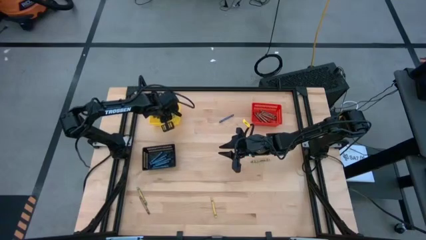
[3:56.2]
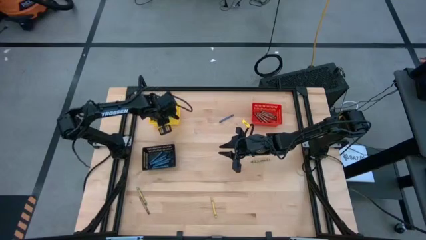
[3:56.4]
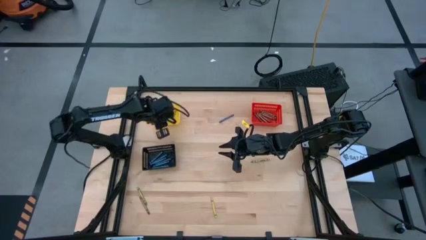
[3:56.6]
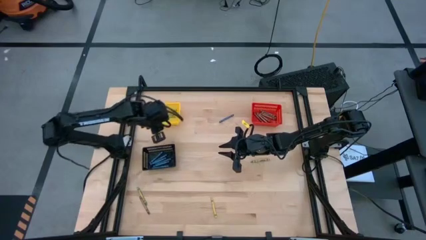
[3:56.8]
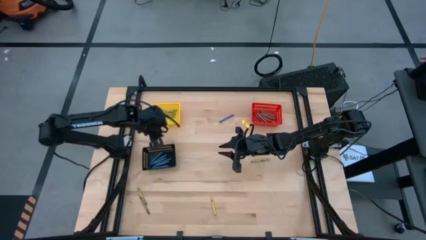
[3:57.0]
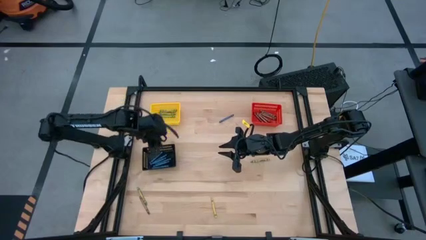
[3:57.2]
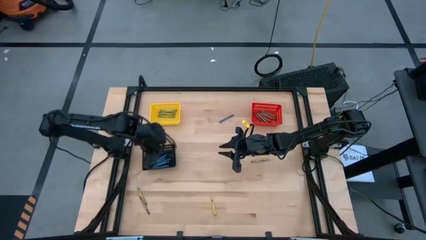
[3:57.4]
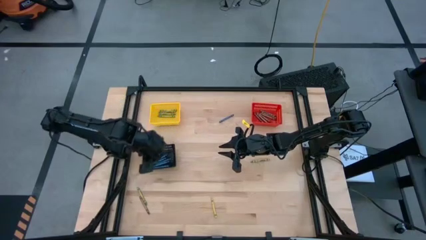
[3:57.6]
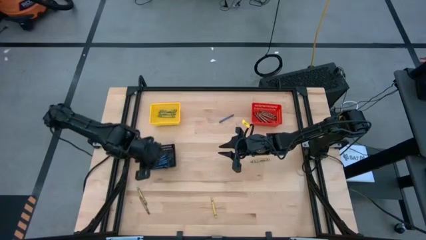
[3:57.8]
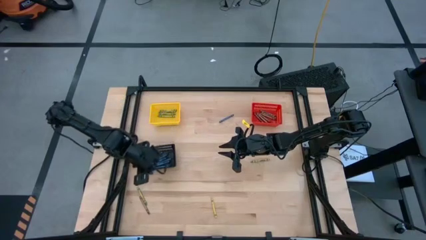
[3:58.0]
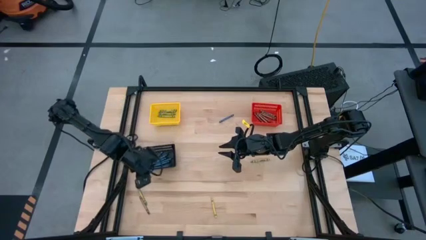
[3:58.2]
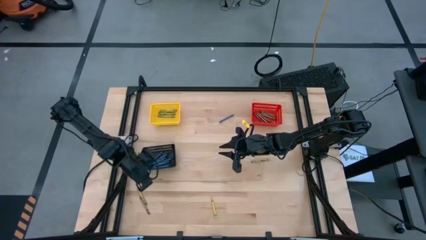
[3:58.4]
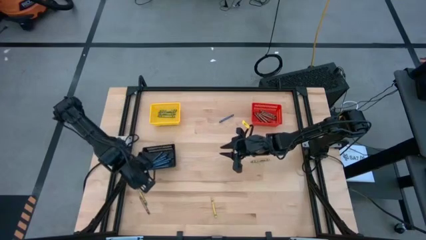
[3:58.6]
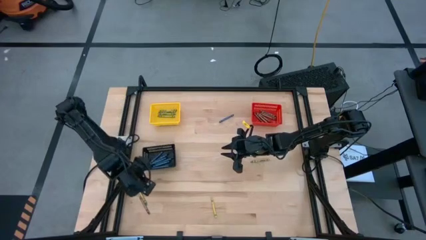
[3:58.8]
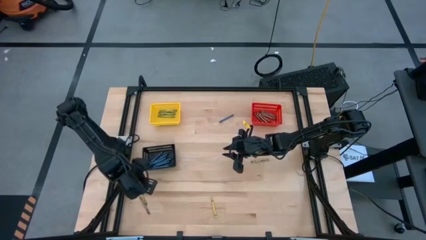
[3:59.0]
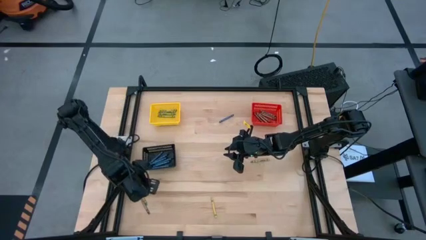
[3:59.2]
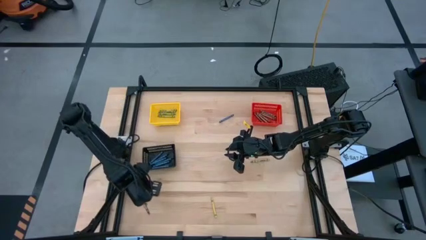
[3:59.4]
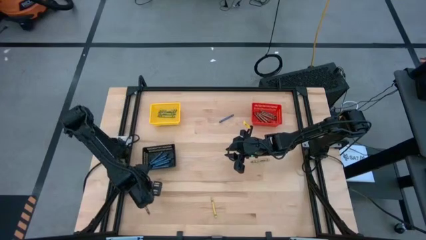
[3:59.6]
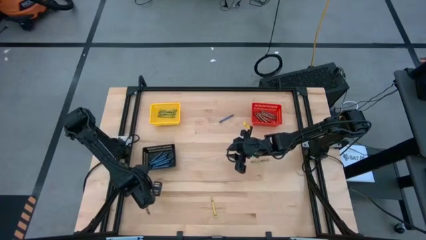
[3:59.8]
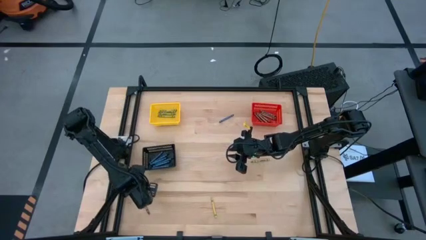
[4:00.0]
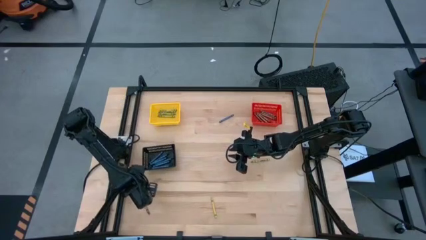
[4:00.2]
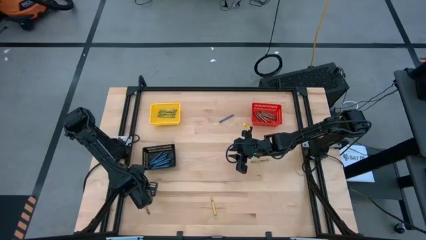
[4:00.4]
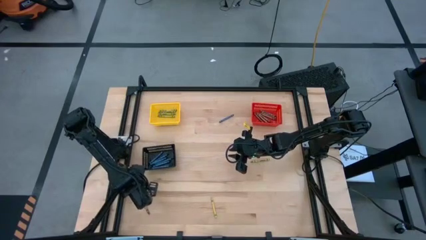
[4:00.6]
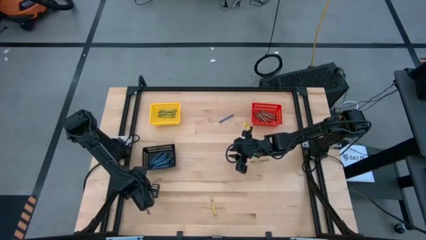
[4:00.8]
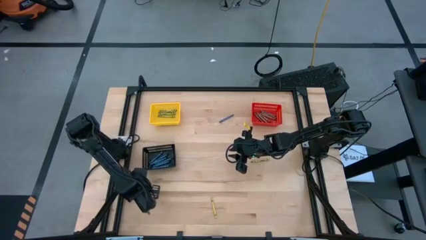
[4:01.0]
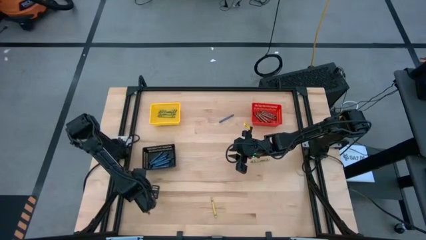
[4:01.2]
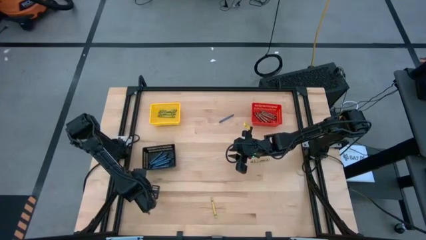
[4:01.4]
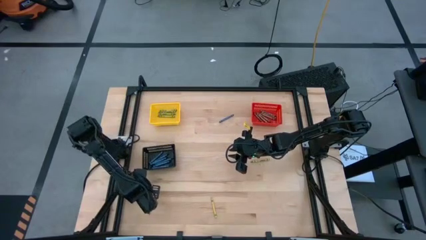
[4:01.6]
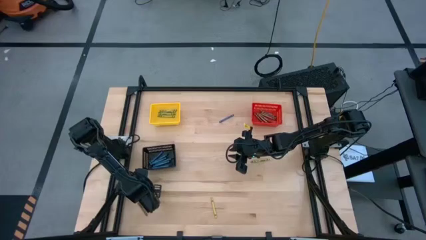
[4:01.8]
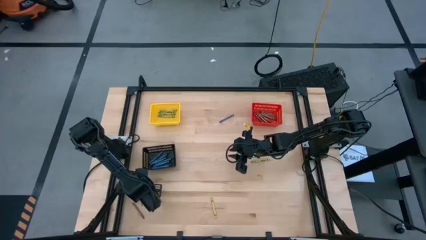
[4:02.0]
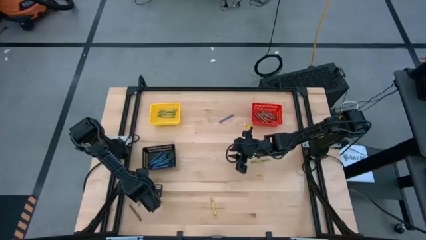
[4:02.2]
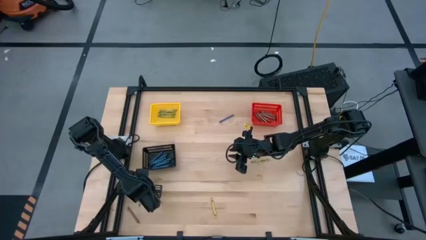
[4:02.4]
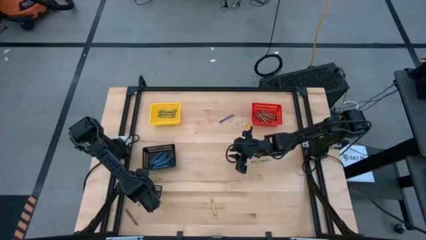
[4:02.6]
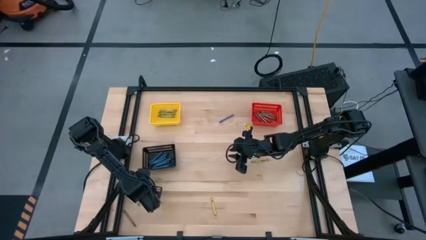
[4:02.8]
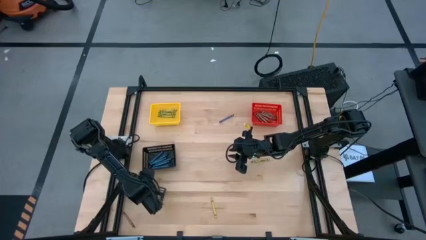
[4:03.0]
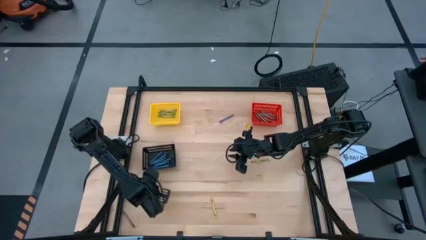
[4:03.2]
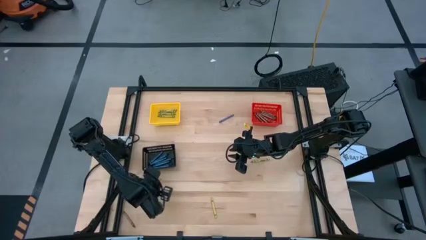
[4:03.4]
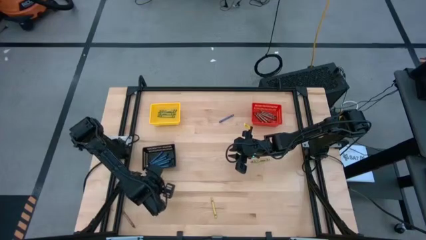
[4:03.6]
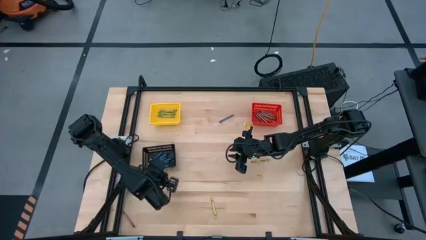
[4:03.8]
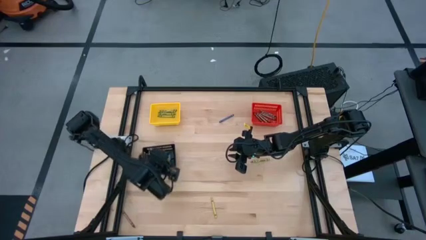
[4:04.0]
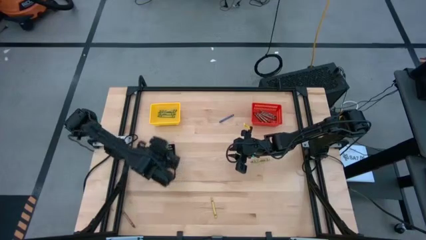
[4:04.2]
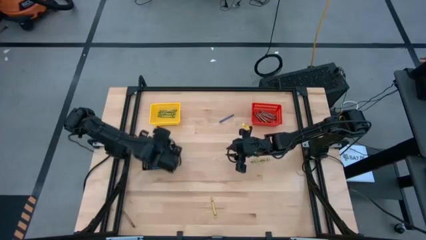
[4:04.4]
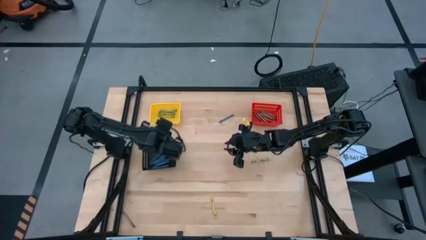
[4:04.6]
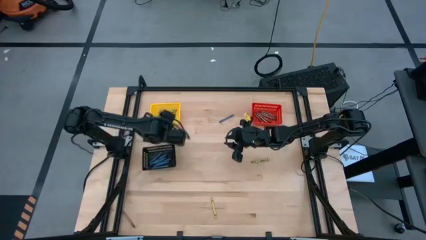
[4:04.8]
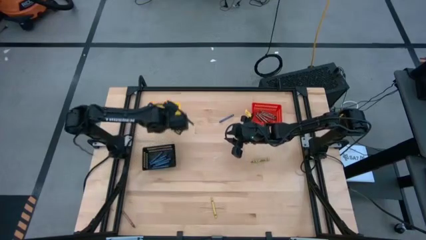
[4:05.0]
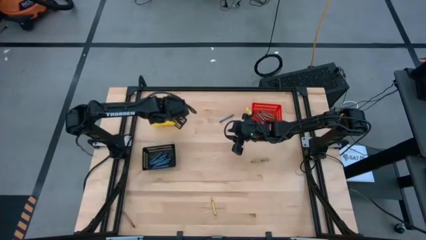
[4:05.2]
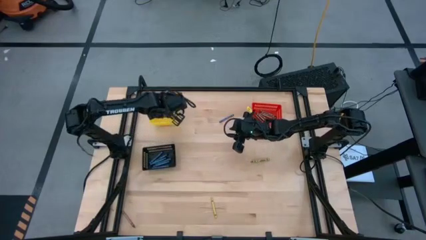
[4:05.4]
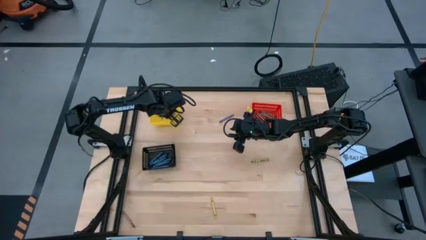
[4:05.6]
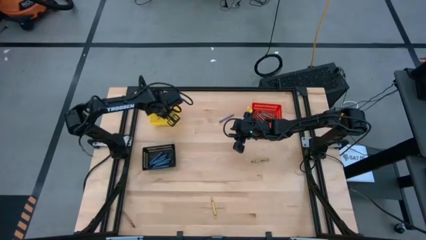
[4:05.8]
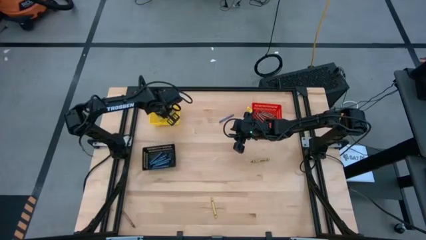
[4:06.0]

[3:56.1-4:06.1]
Task: Sort crayons
Put the green crayon into the yellow bin

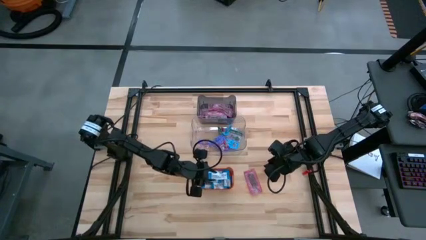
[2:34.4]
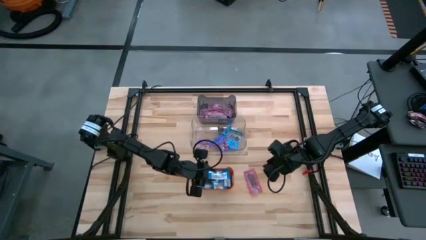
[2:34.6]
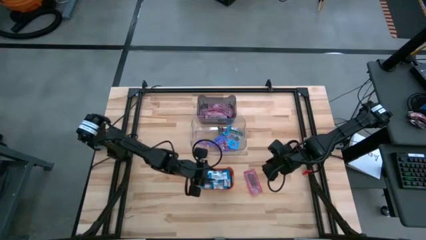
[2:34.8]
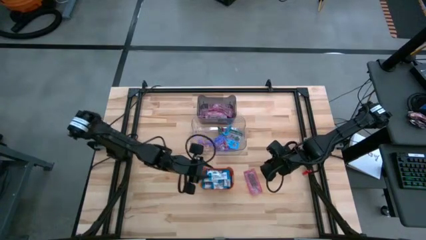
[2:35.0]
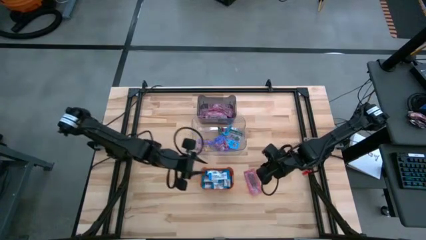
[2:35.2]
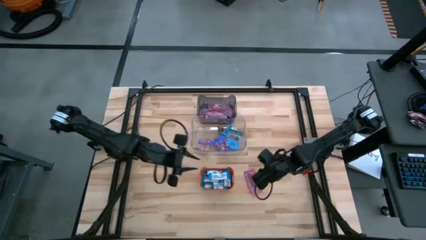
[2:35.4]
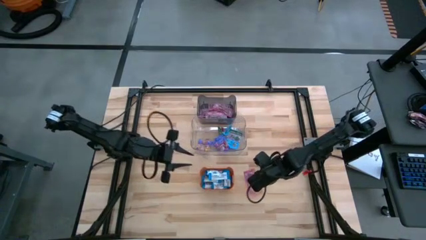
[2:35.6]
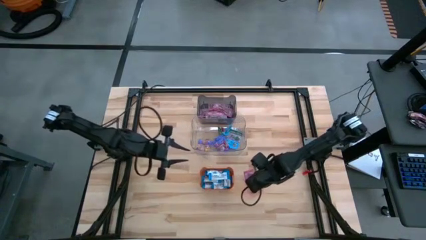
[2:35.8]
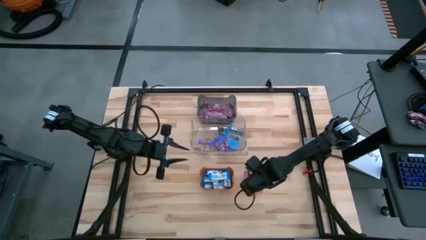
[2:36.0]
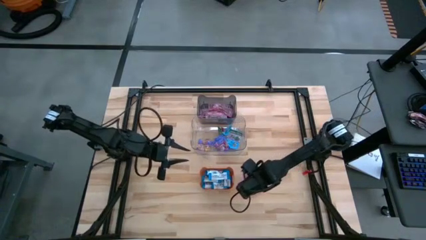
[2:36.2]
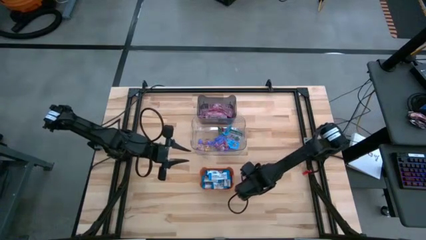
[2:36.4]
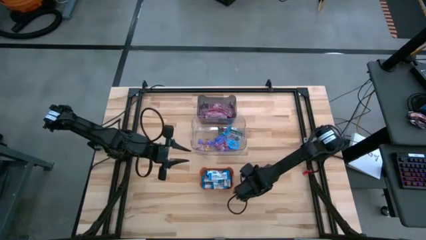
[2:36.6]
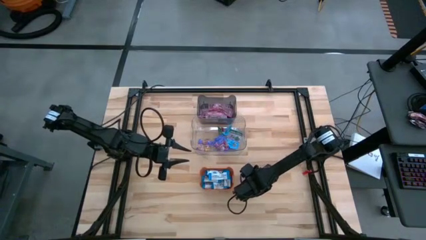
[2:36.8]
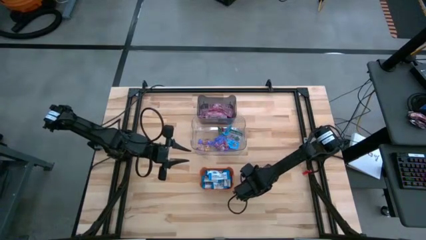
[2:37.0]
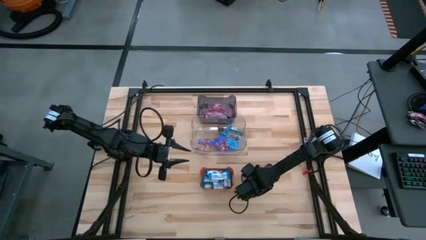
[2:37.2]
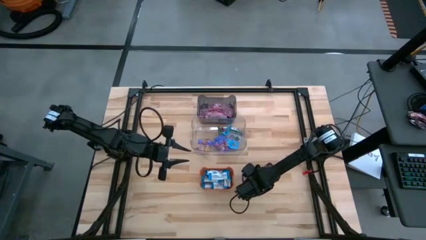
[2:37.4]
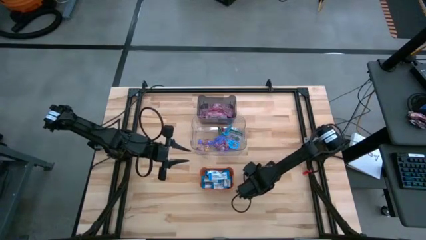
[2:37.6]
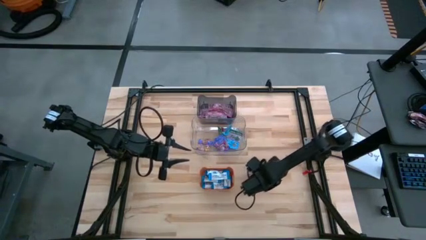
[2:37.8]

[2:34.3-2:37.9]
Task: Sort candy
Put the red candy into the black transparent bin

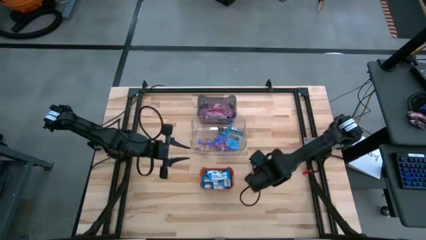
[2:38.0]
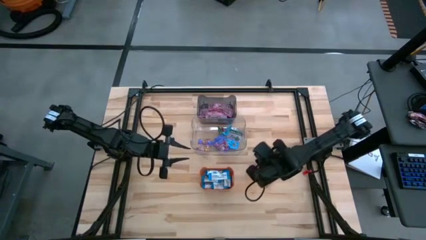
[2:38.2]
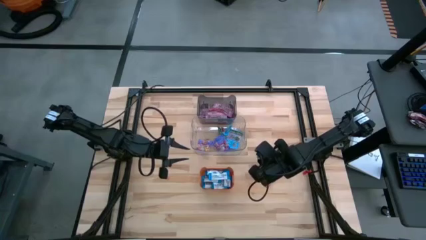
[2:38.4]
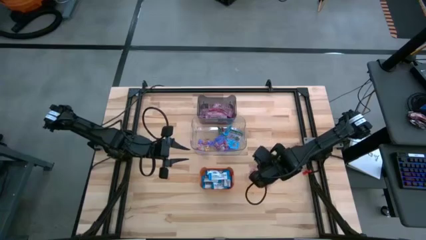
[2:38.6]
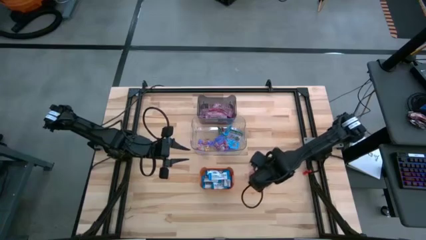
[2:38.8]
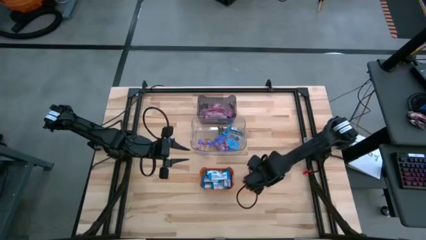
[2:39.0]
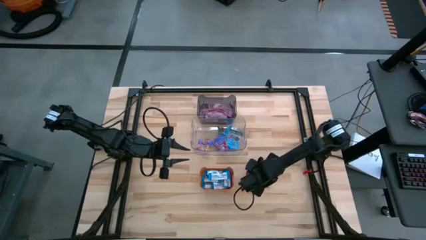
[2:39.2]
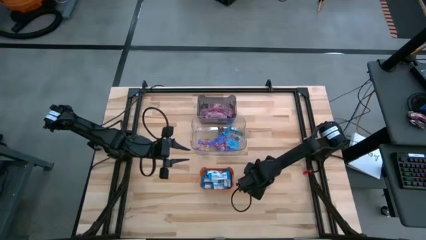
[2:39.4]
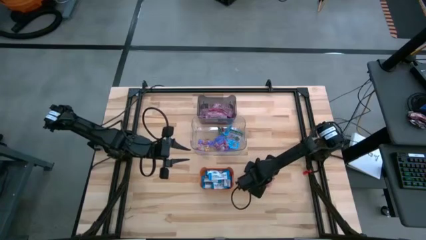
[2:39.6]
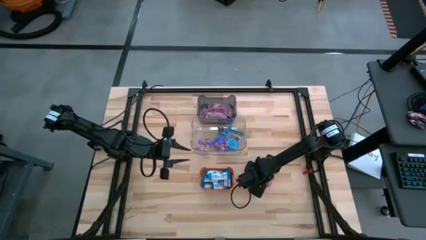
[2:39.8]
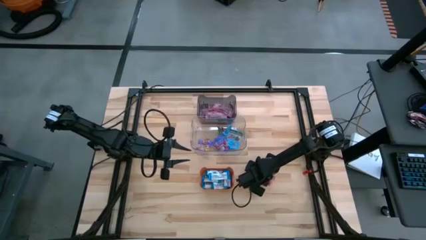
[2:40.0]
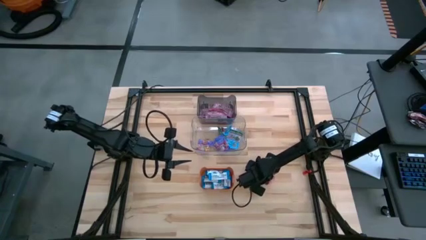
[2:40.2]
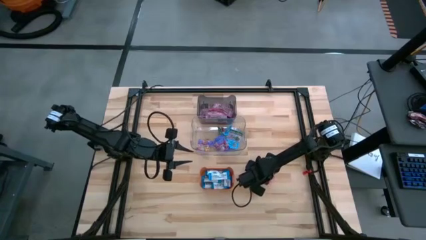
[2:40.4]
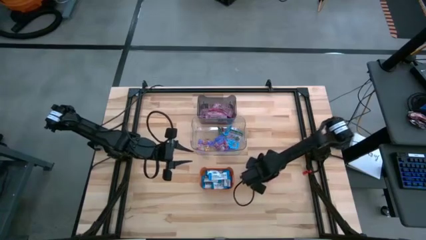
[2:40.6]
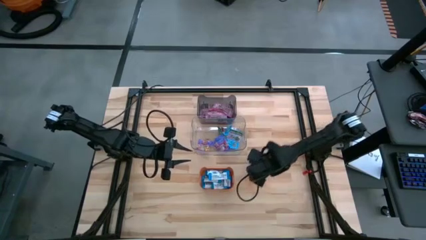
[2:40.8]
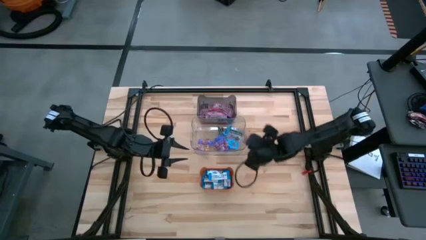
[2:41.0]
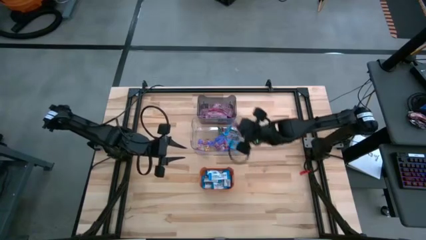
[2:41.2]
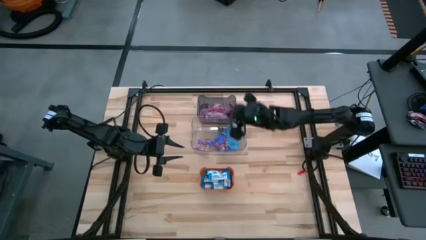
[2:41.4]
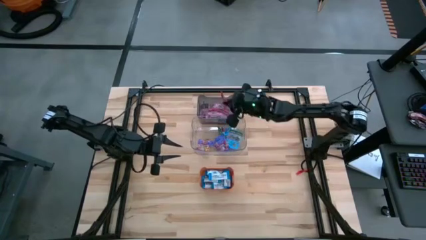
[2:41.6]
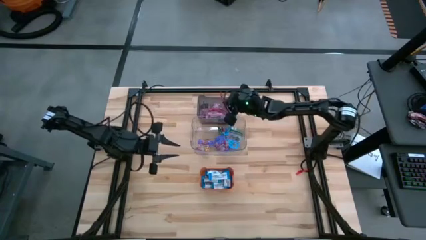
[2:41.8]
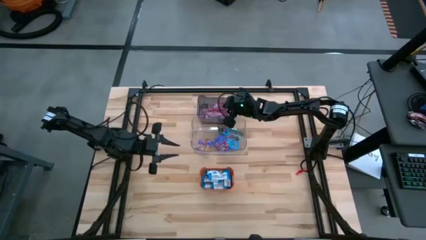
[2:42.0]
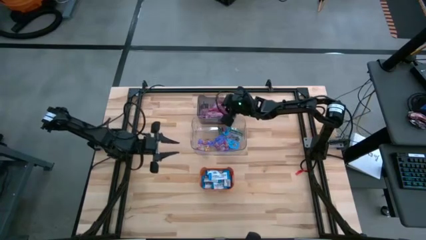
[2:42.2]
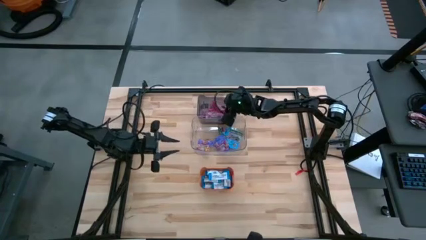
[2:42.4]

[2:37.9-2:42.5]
Put the red candy into the black transparent bin
